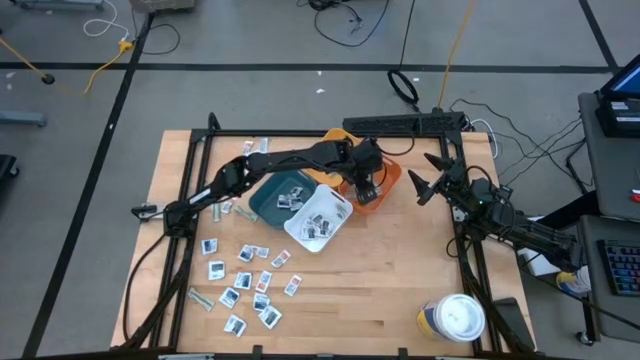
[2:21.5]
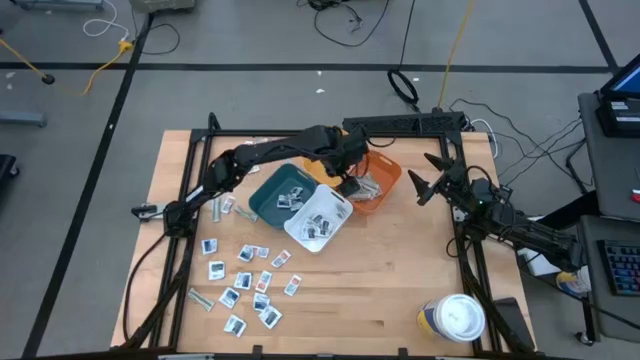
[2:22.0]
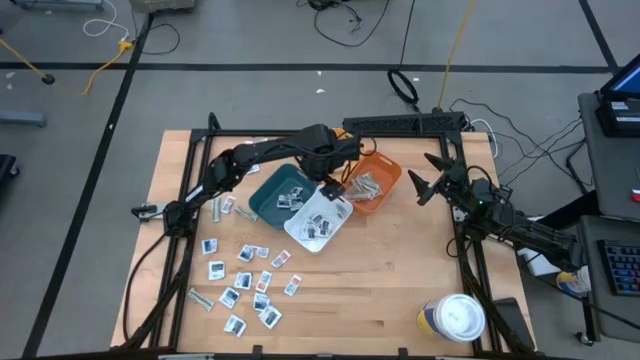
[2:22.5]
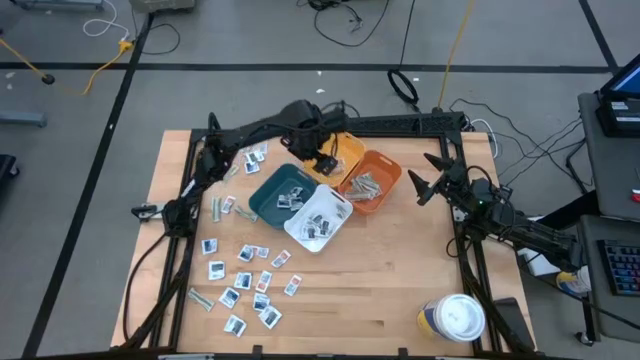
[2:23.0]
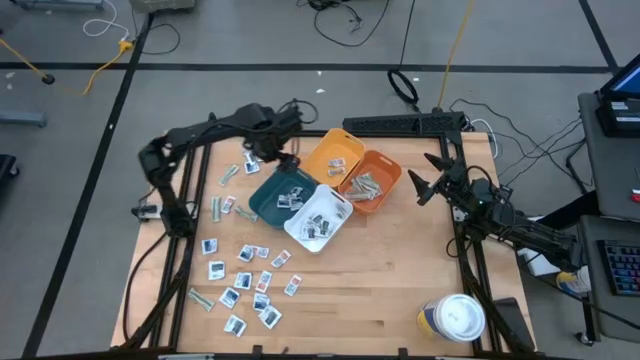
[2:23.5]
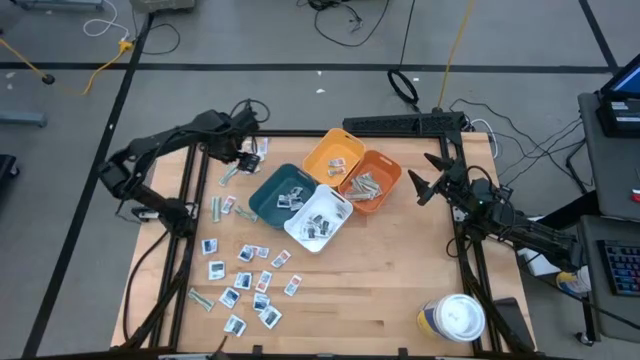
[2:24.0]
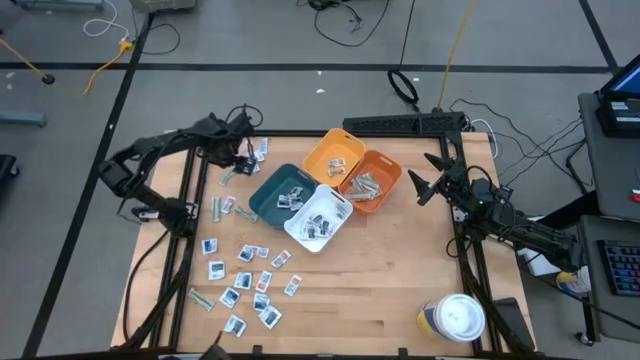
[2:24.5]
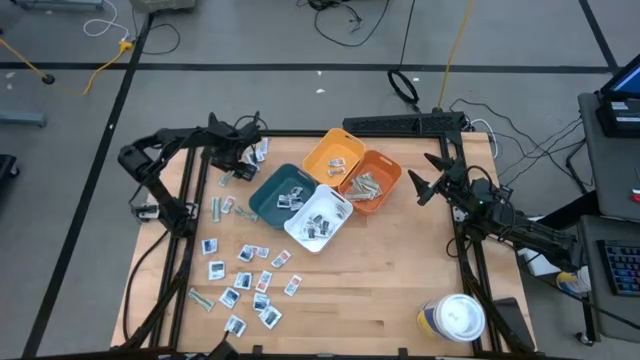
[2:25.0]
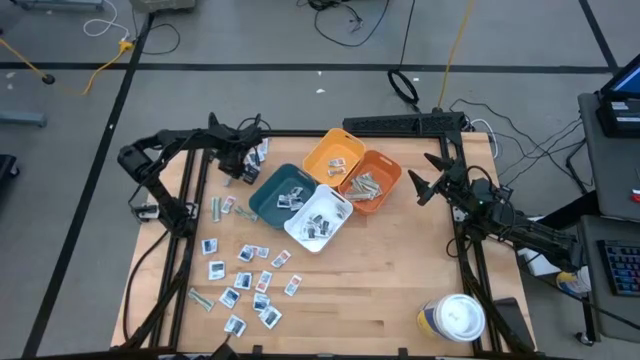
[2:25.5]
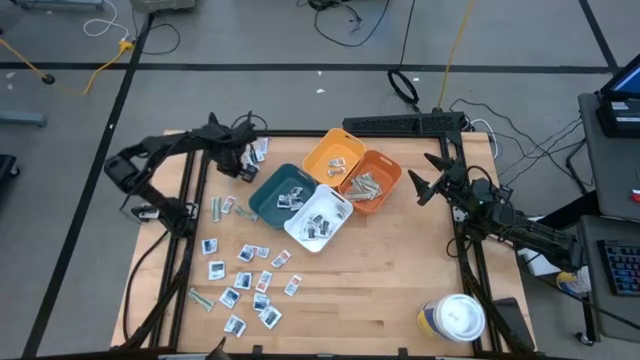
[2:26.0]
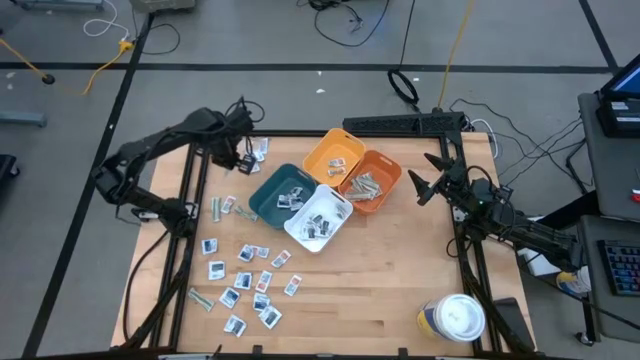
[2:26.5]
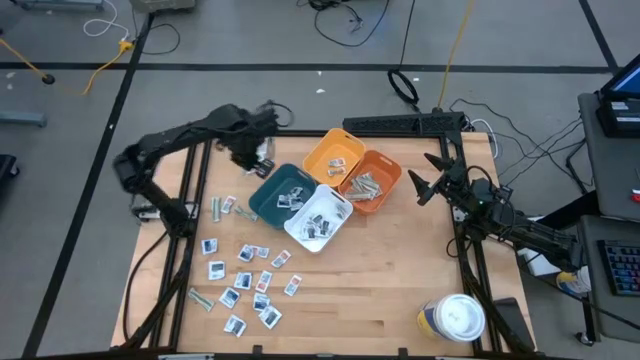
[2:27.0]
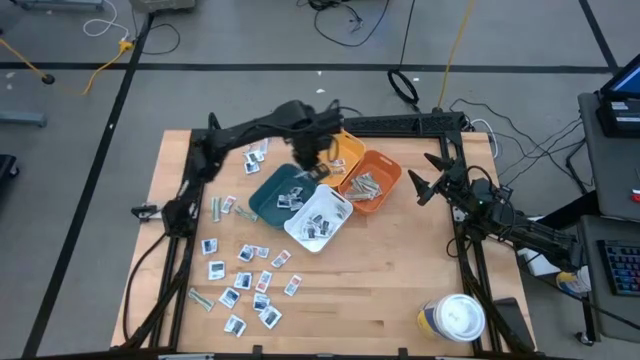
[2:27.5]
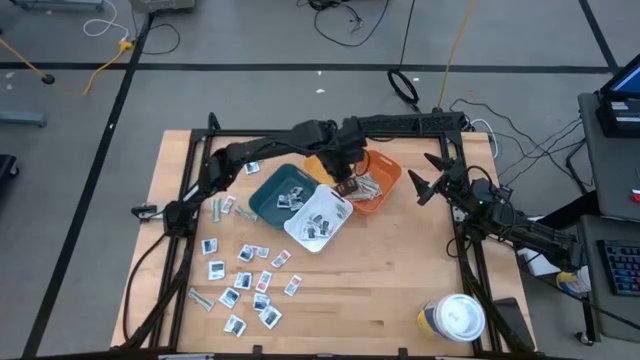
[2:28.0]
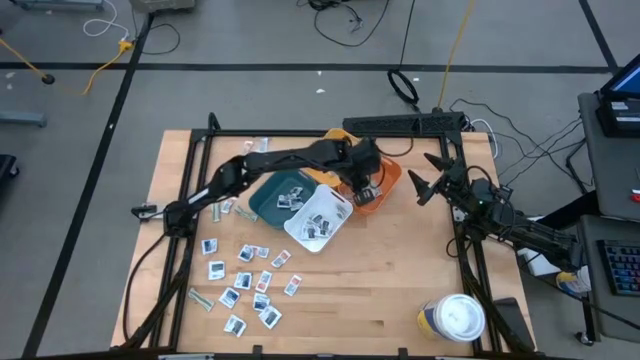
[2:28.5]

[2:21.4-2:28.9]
Task: Pick & Place First Aid Supplies
Put the green bandage pack into the orange bin

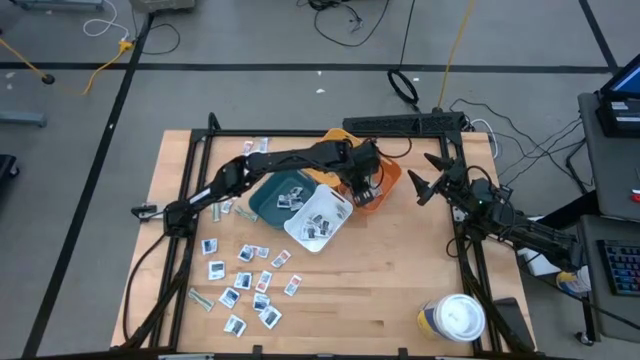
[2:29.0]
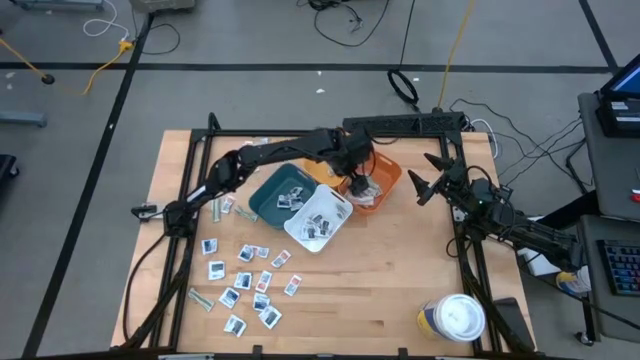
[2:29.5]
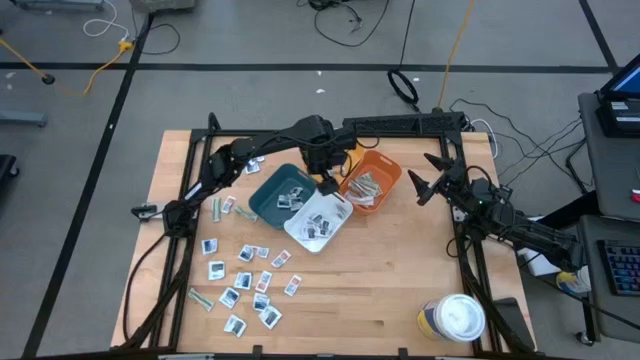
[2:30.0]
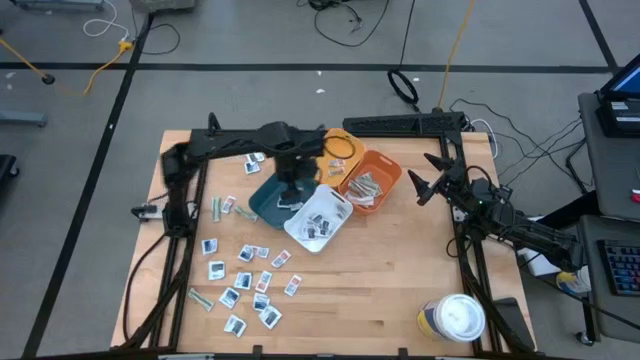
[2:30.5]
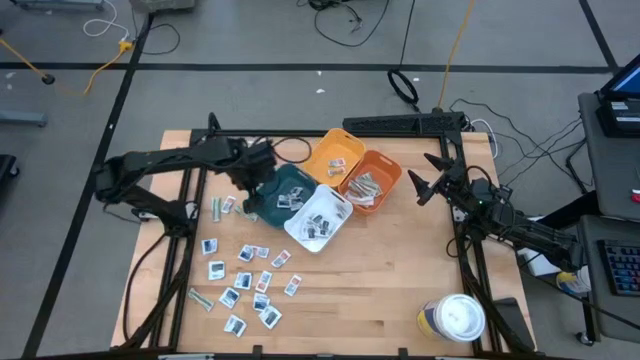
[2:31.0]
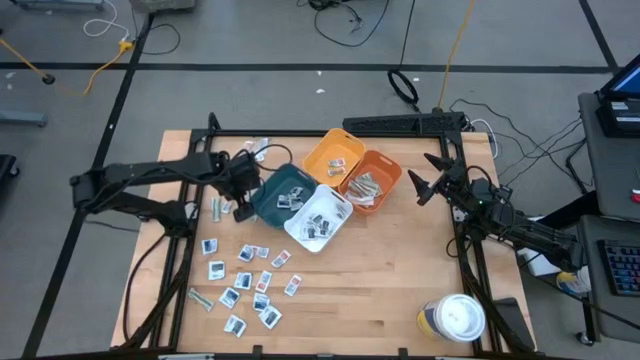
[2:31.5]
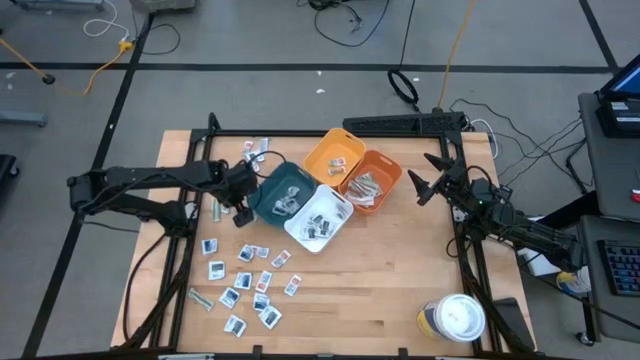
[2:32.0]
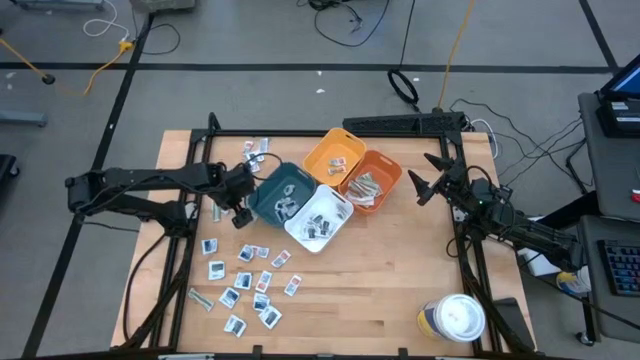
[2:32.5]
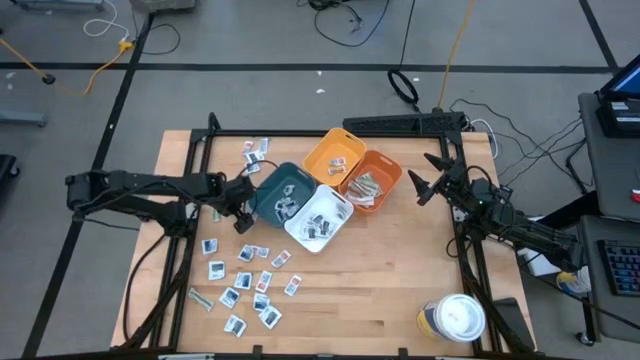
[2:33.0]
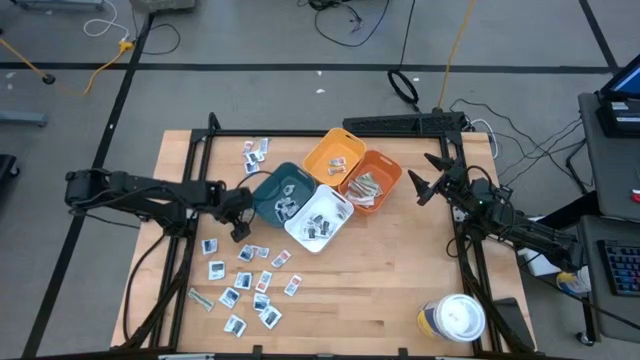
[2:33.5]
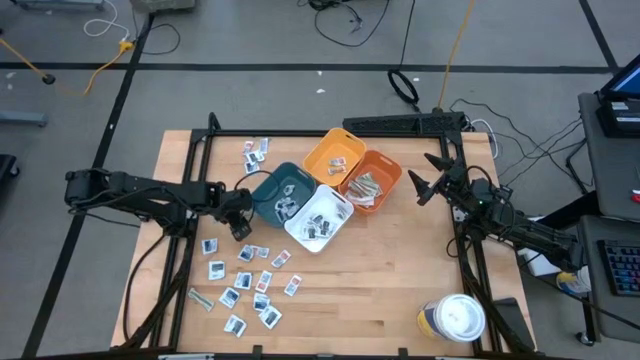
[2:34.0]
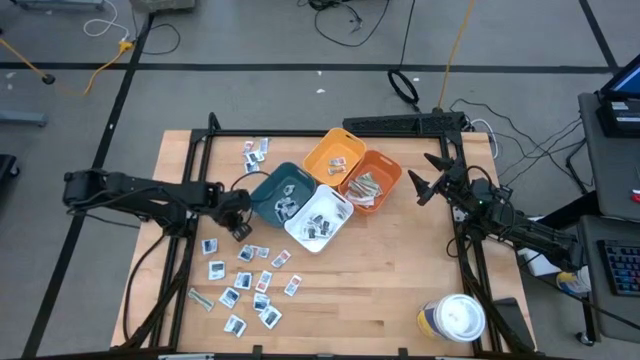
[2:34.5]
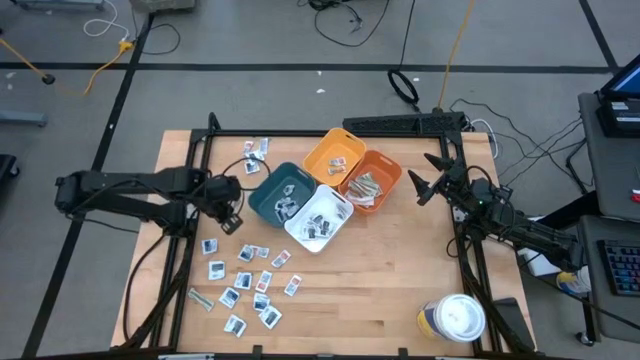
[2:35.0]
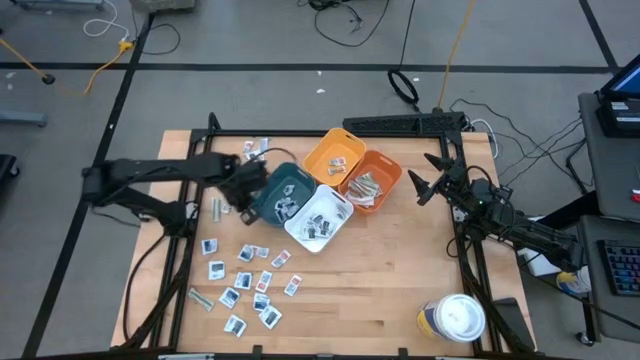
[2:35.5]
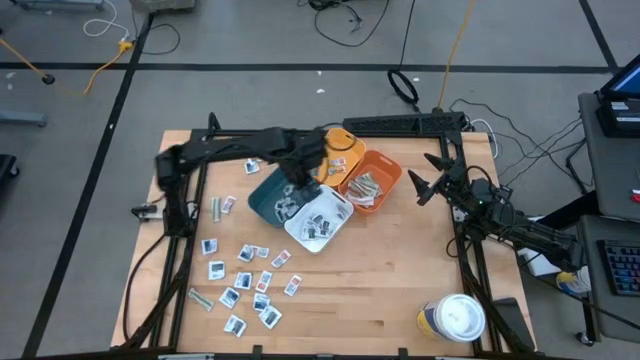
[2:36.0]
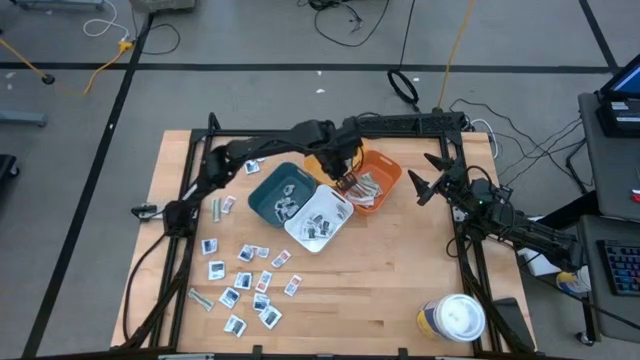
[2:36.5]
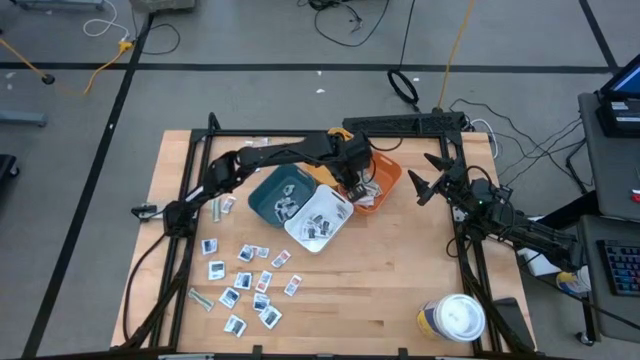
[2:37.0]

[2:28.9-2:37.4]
Put the green bandage pack into the orange bin

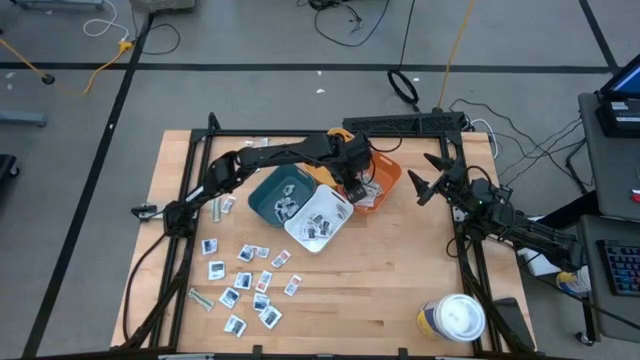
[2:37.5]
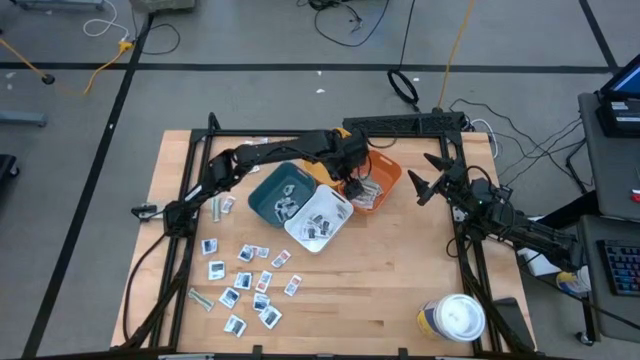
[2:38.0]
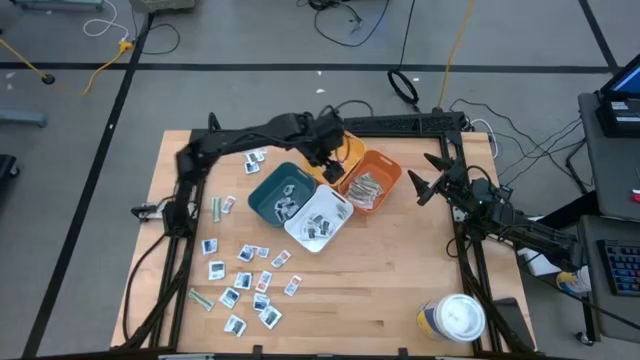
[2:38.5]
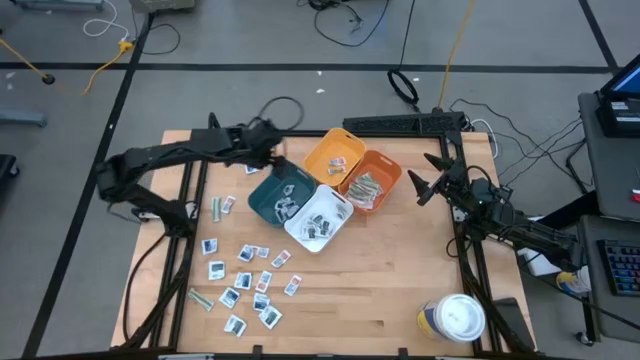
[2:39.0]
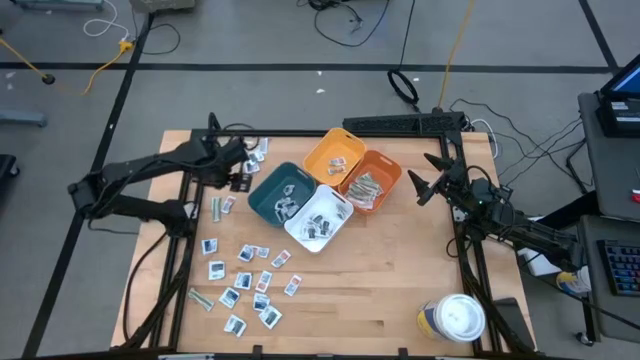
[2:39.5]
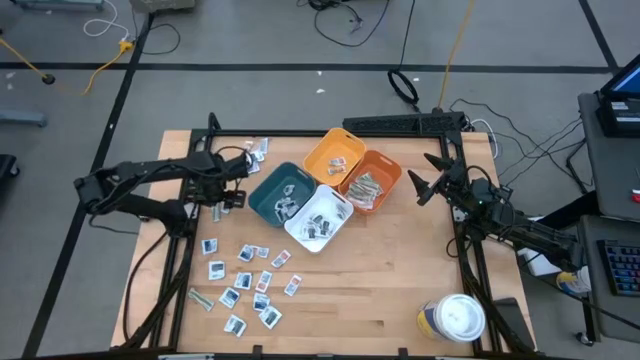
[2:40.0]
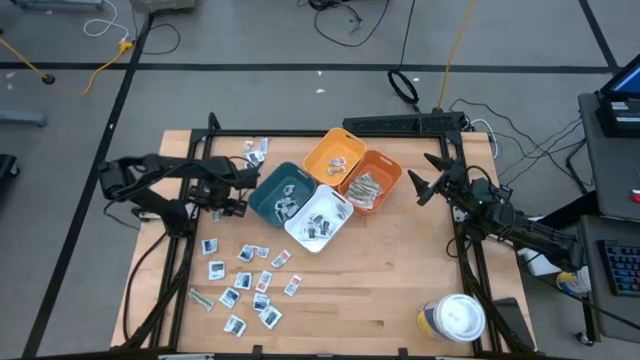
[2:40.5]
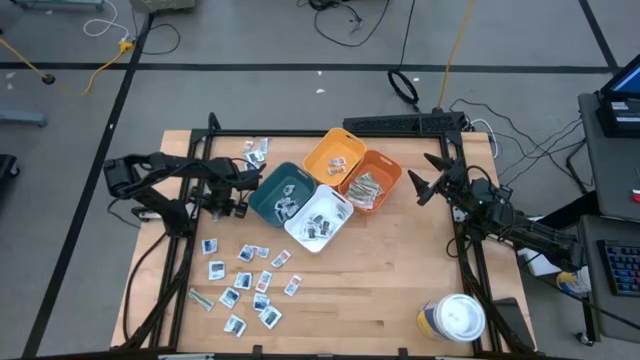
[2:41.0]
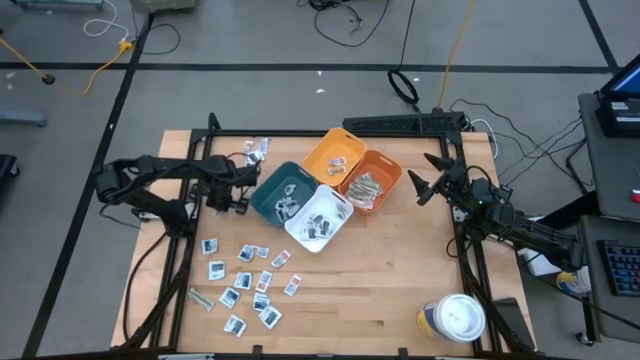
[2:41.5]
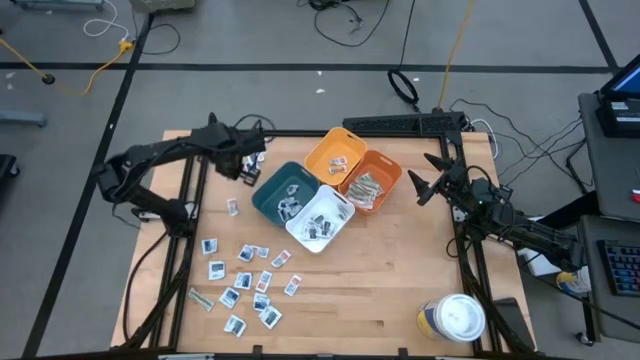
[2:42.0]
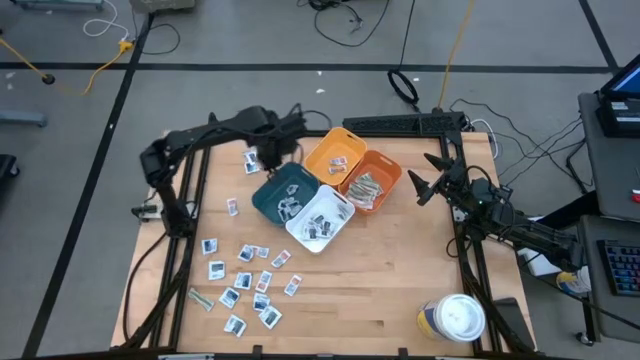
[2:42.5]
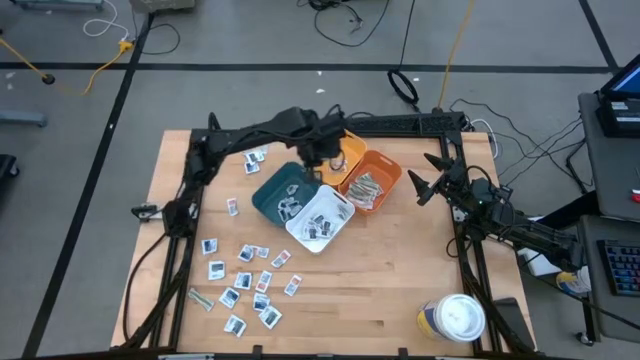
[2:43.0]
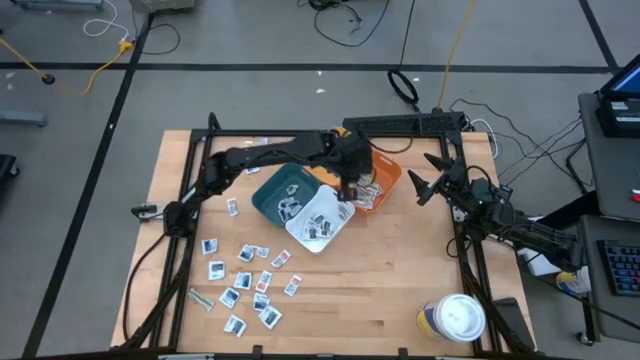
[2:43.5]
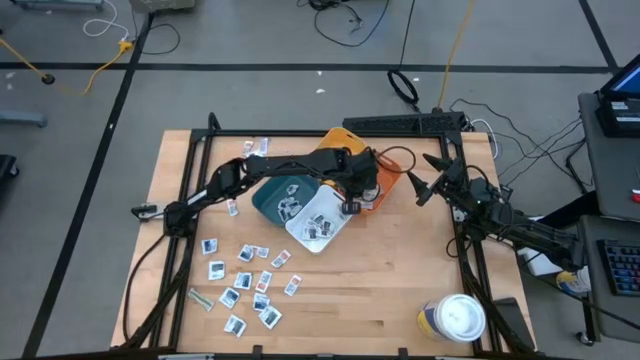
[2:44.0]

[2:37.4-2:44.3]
Put the green bandage pack into the orange bin
